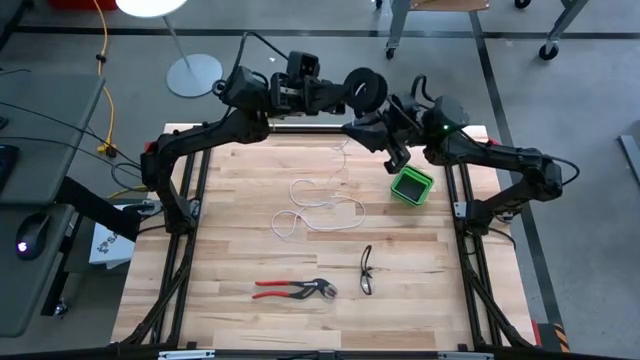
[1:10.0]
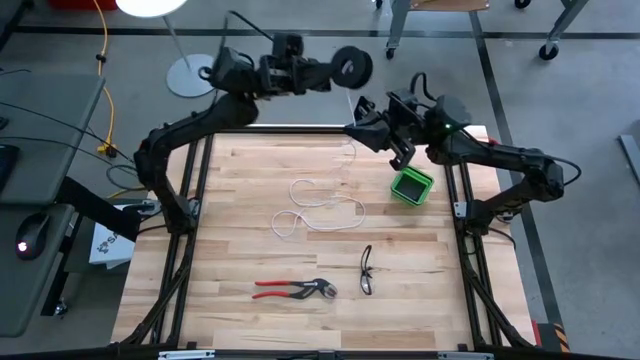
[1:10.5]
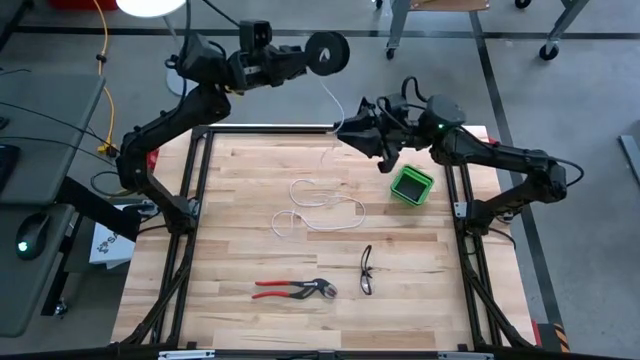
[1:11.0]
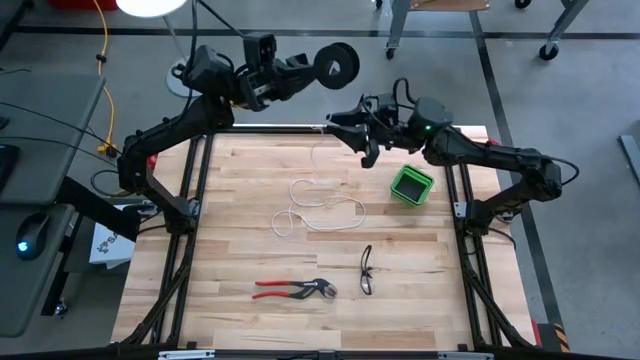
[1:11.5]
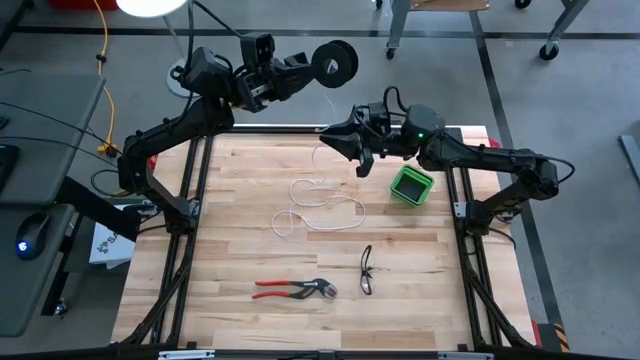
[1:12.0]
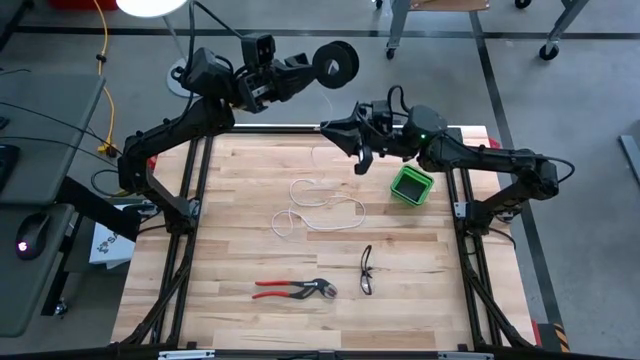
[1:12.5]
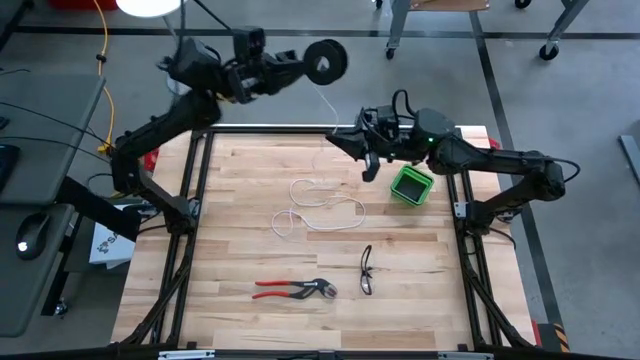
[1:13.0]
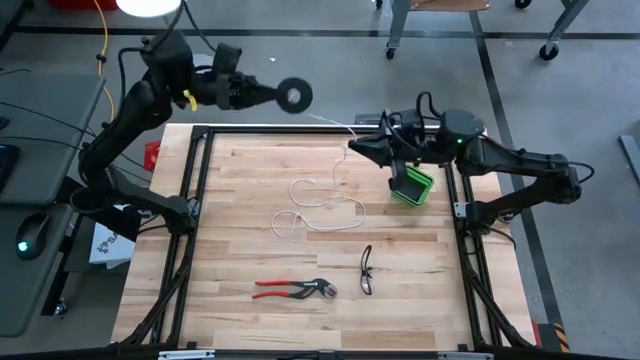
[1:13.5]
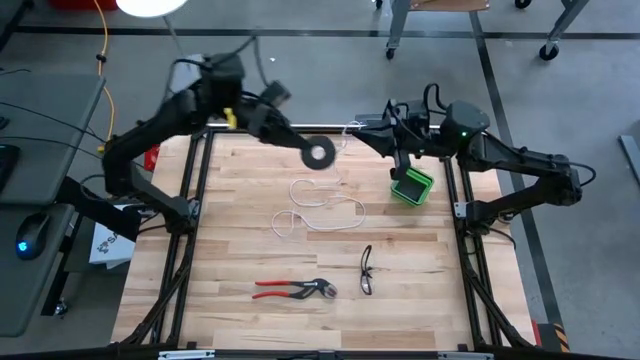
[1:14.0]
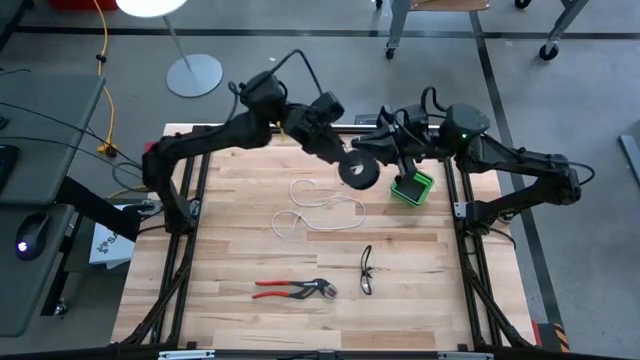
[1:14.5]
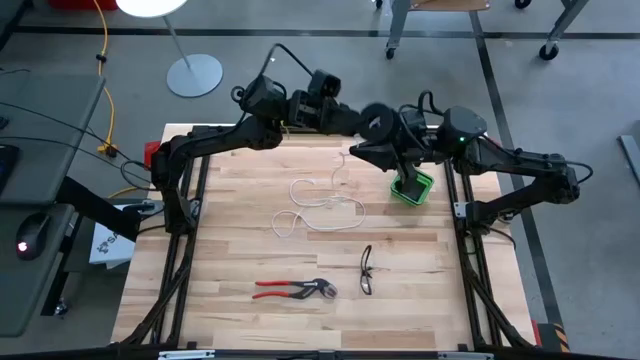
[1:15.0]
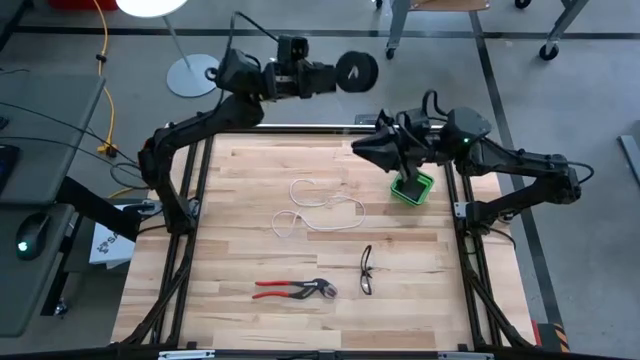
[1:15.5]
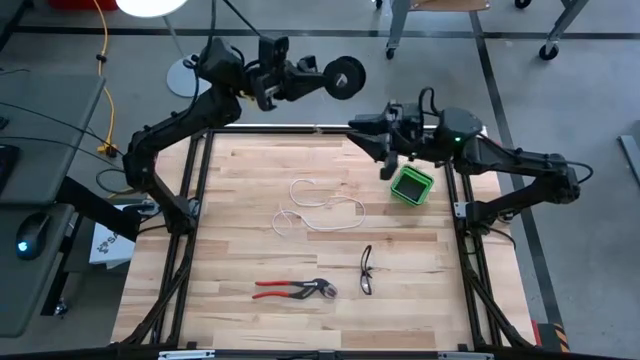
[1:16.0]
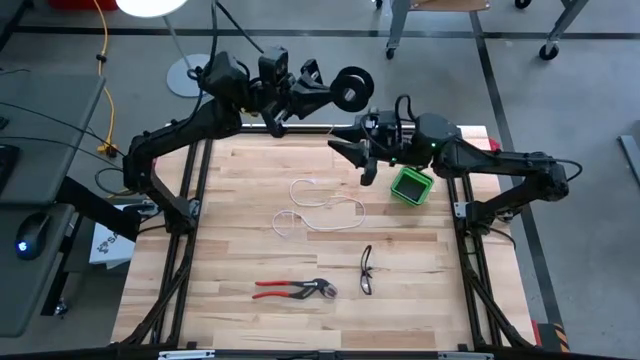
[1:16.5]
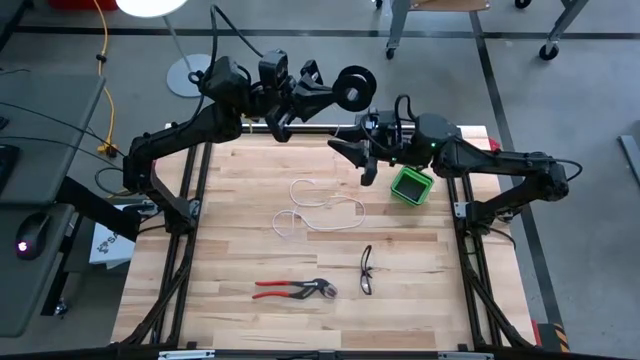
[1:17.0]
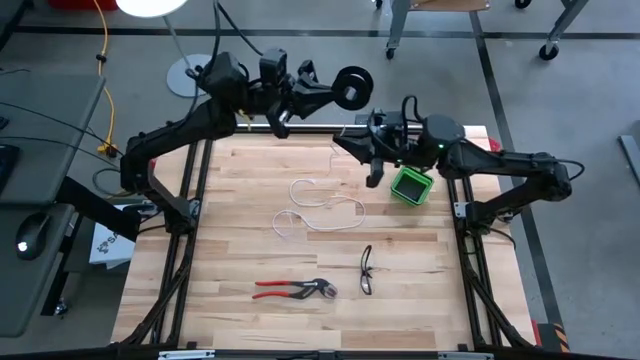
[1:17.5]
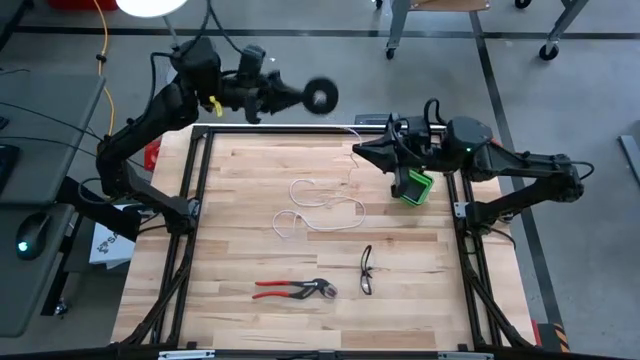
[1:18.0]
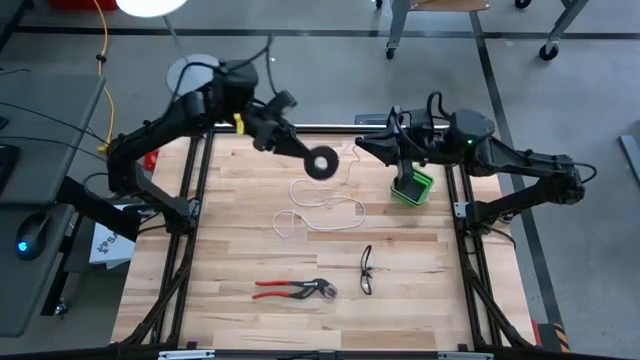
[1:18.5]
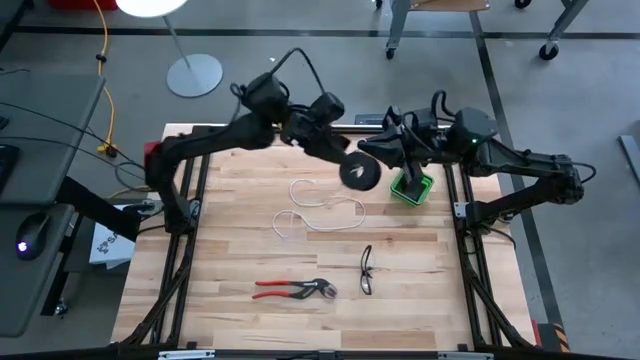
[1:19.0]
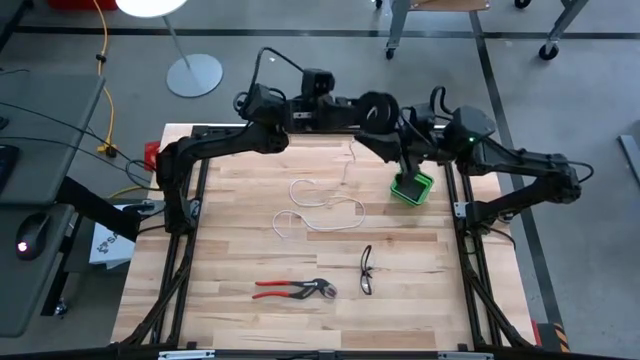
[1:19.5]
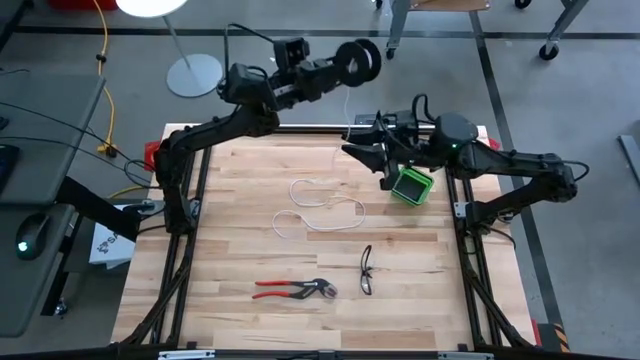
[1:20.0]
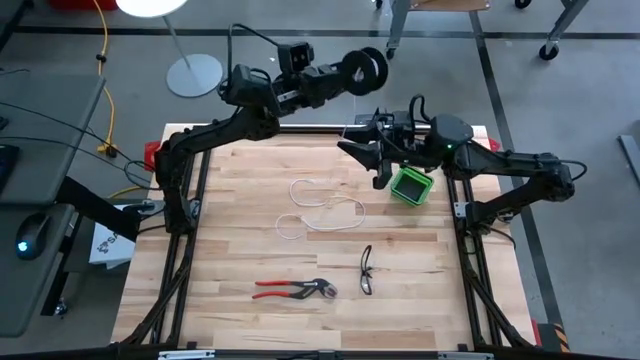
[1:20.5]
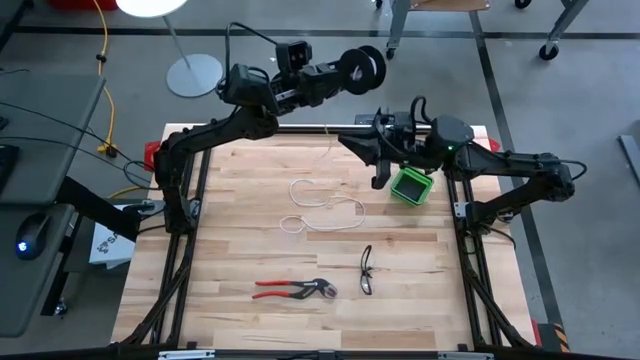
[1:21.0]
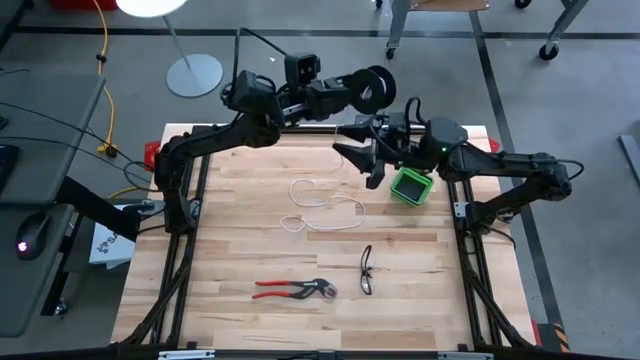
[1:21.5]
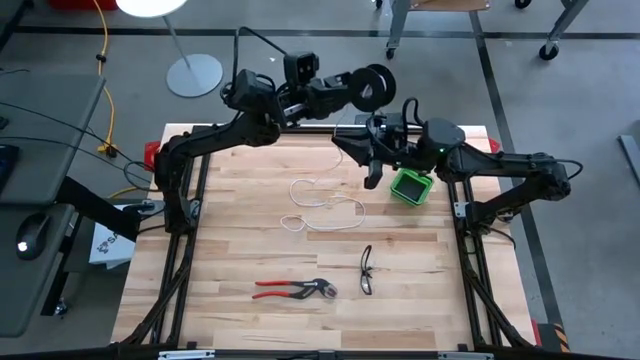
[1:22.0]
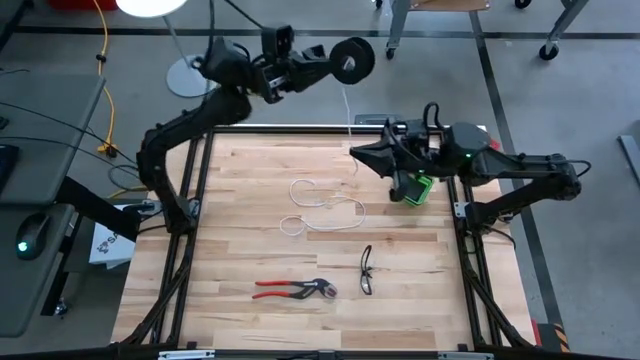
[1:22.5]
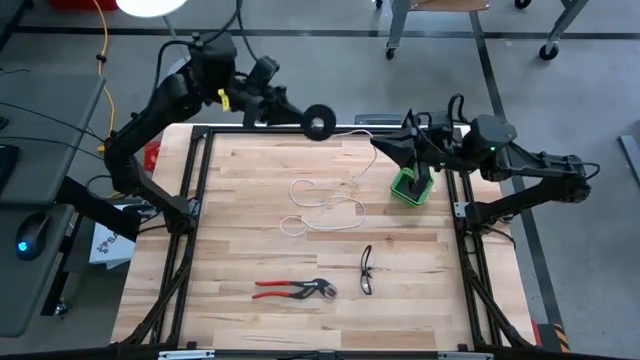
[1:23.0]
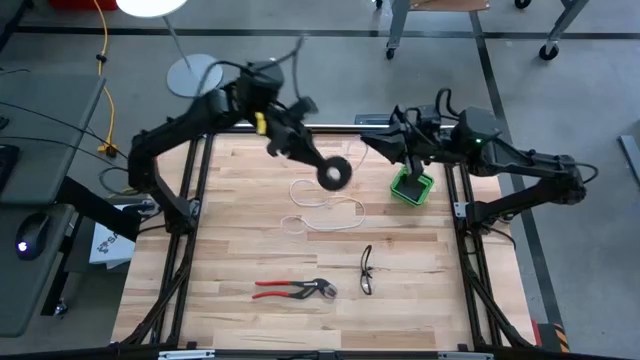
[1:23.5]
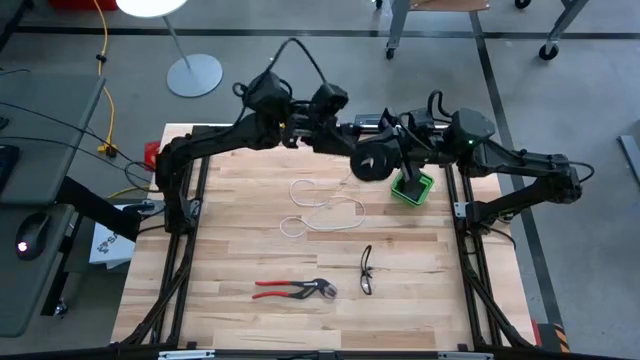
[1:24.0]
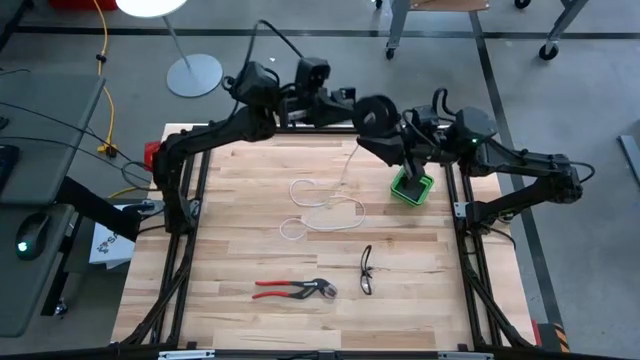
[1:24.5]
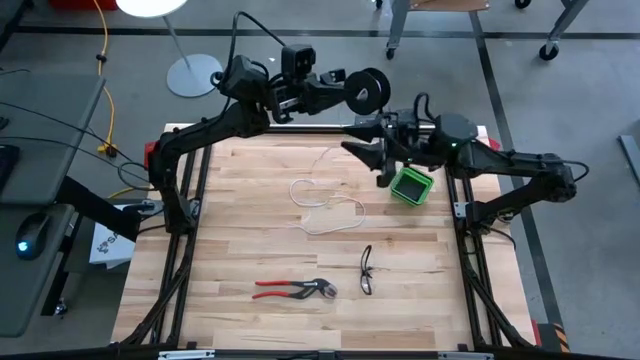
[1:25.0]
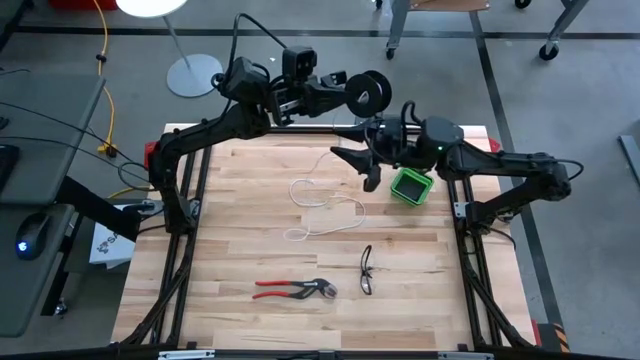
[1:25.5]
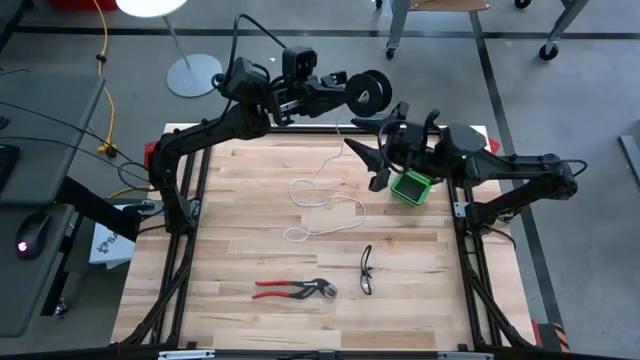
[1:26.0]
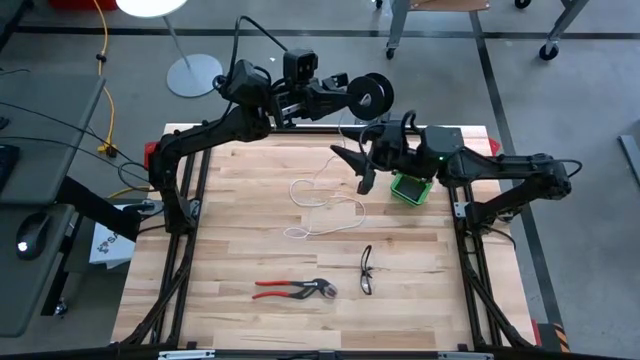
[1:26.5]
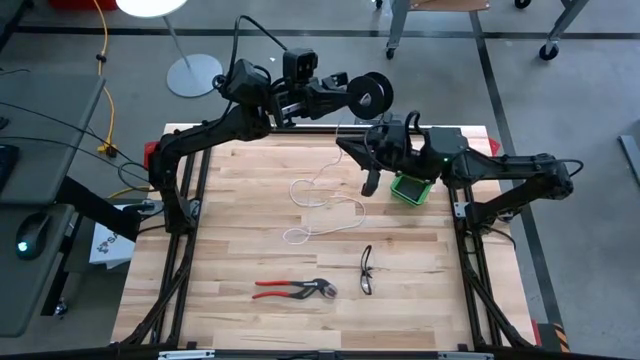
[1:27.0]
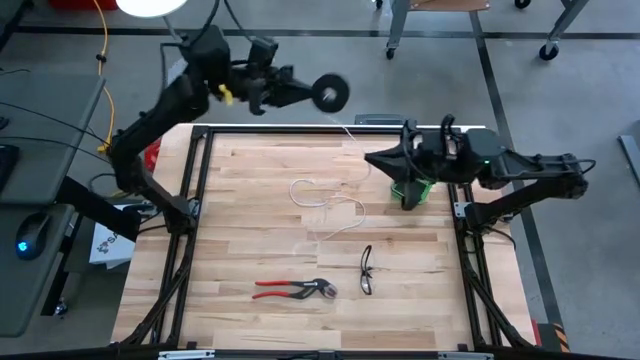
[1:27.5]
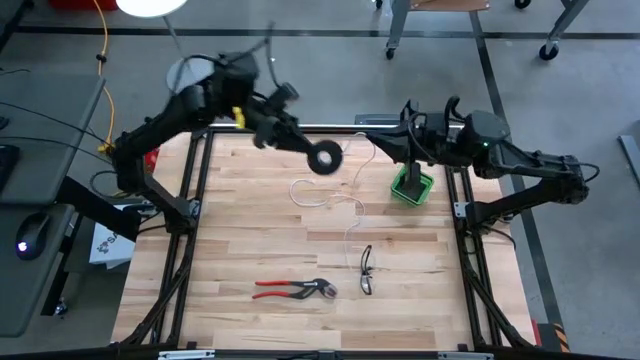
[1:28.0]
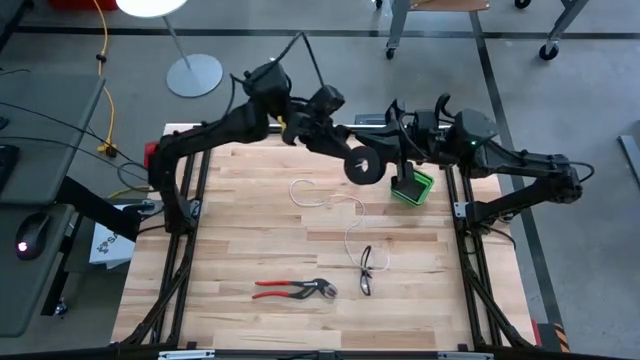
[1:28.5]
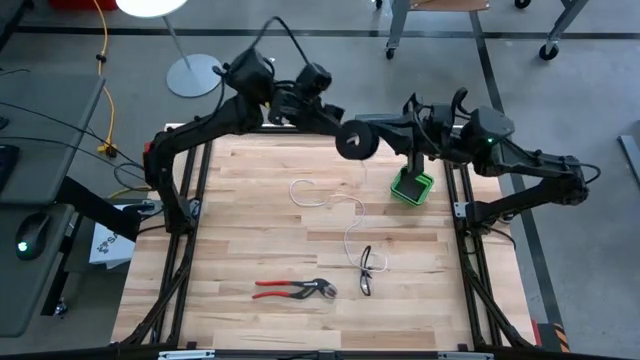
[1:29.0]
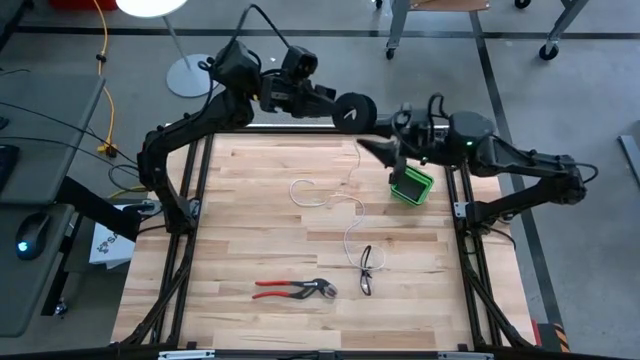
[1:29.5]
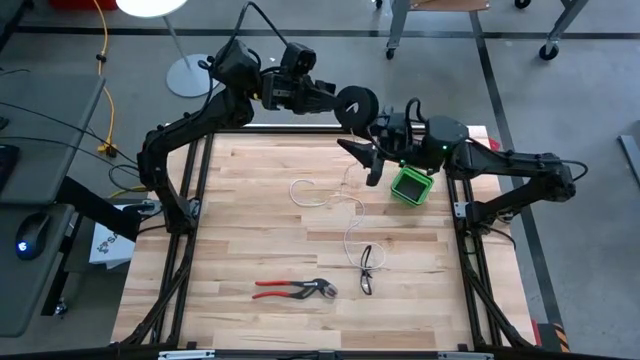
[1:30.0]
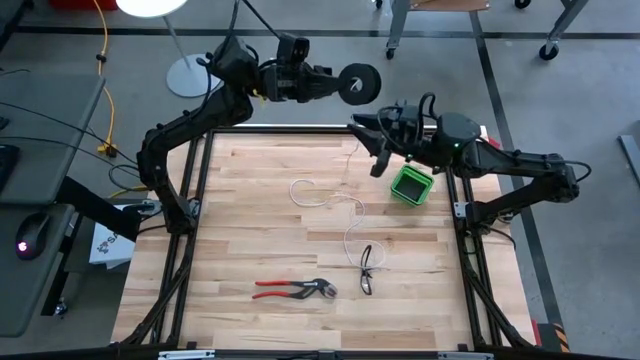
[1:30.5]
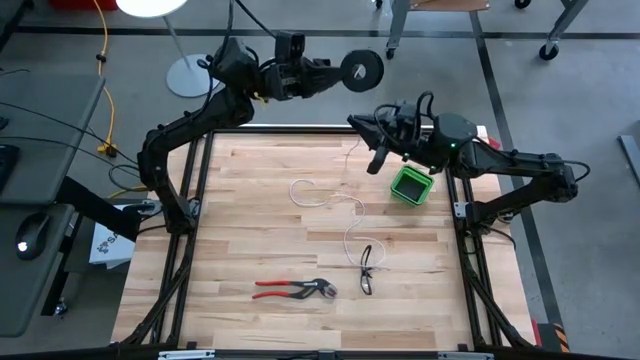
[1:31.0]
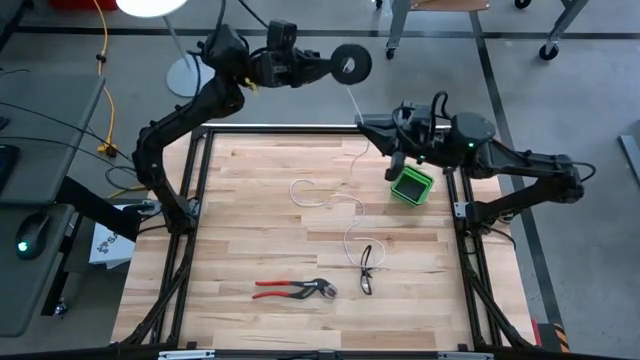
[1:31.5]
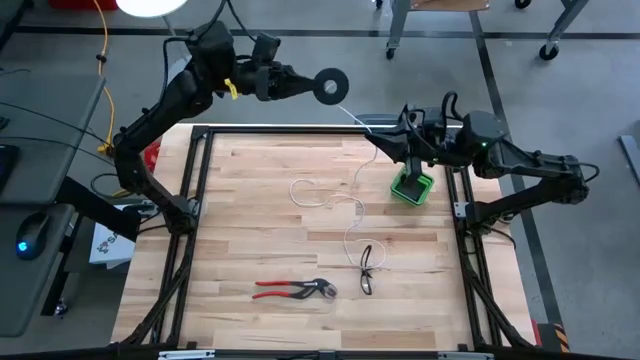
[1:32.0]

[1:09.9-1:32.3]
Task: Coil cords
Coil the wire into the spool
